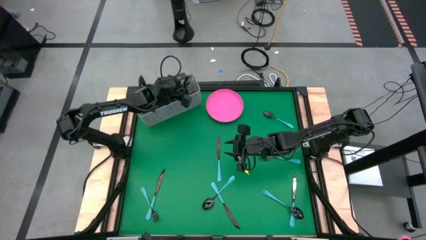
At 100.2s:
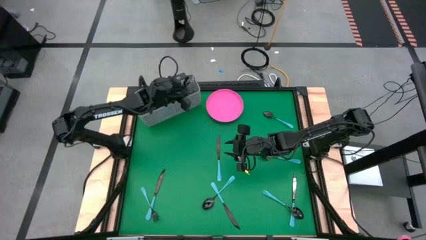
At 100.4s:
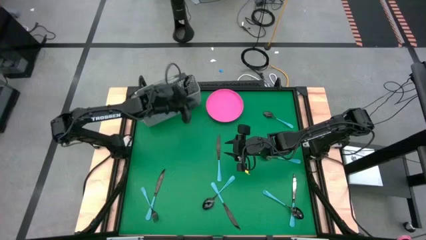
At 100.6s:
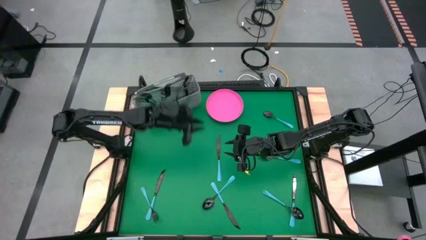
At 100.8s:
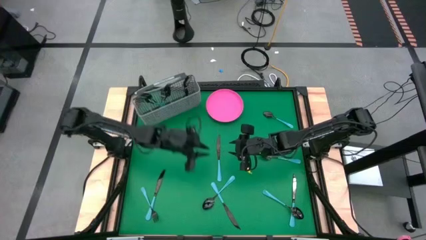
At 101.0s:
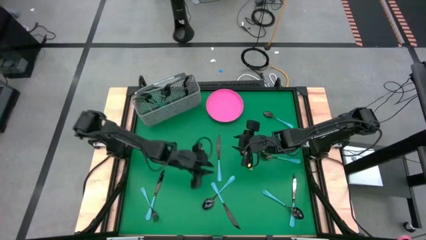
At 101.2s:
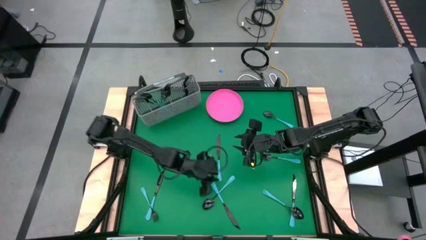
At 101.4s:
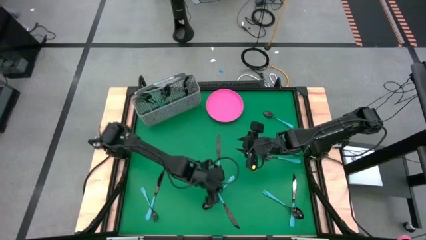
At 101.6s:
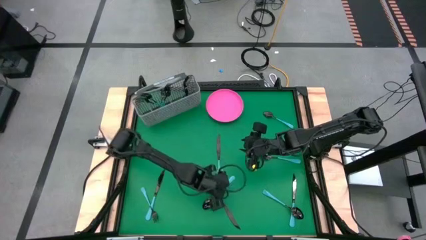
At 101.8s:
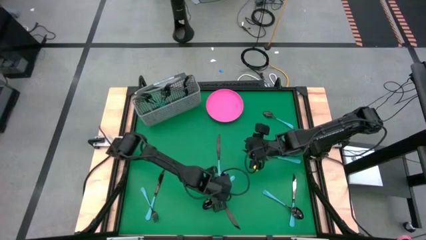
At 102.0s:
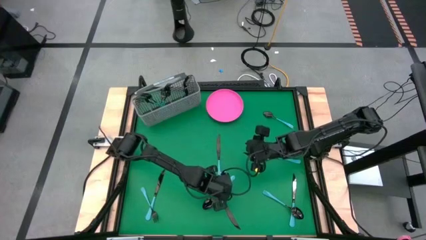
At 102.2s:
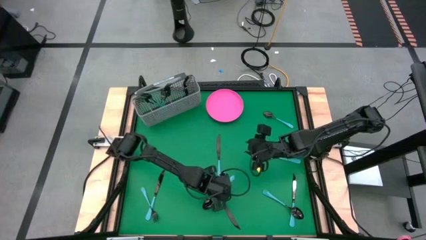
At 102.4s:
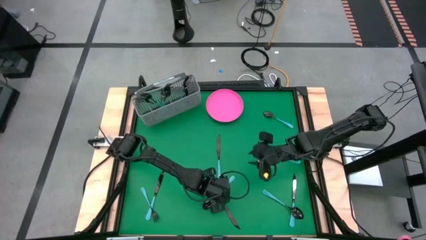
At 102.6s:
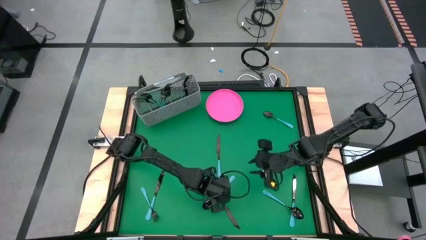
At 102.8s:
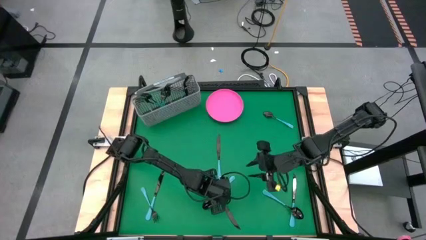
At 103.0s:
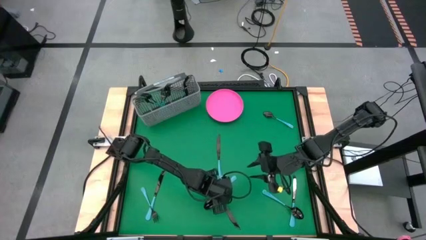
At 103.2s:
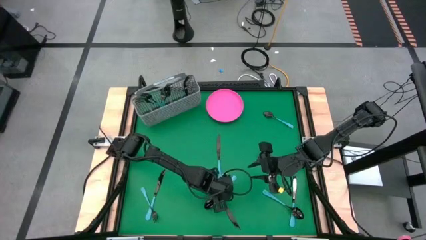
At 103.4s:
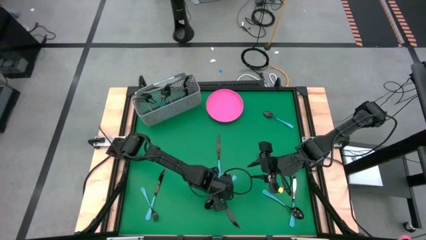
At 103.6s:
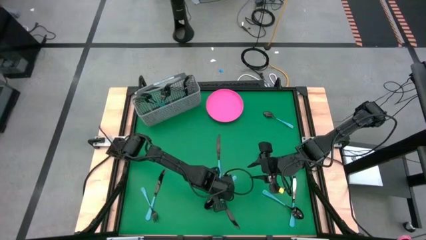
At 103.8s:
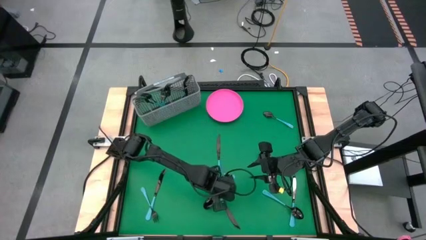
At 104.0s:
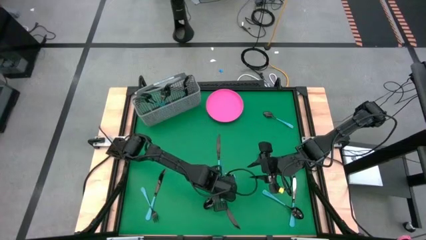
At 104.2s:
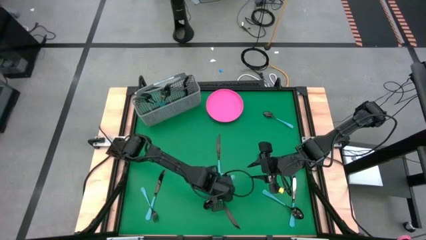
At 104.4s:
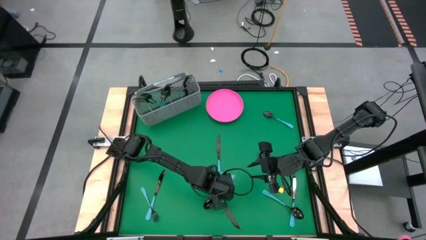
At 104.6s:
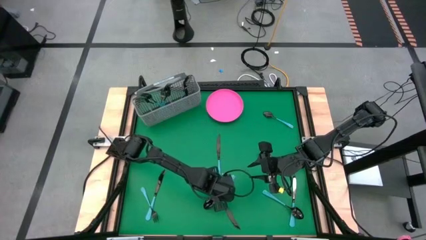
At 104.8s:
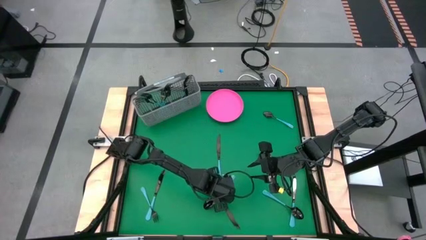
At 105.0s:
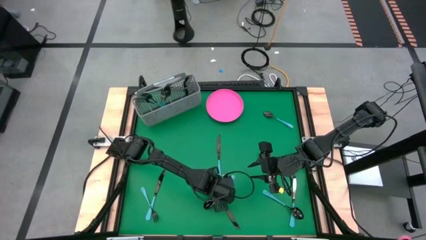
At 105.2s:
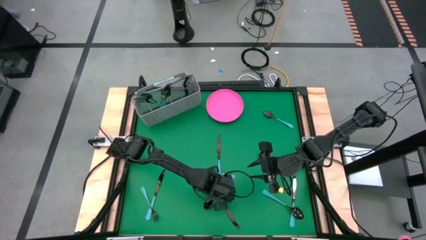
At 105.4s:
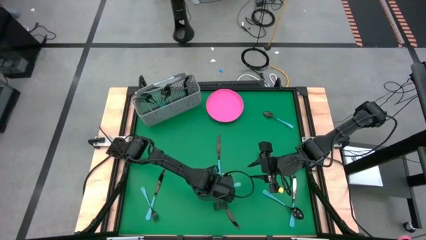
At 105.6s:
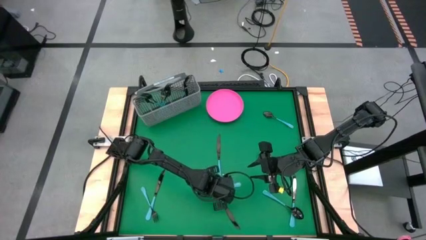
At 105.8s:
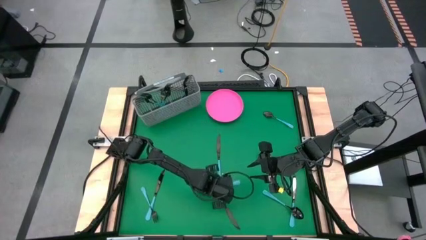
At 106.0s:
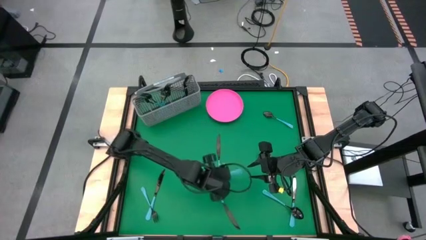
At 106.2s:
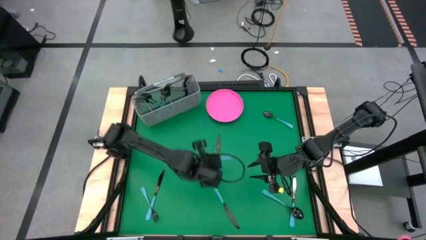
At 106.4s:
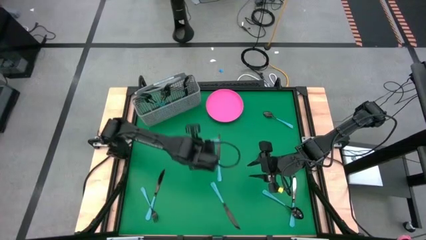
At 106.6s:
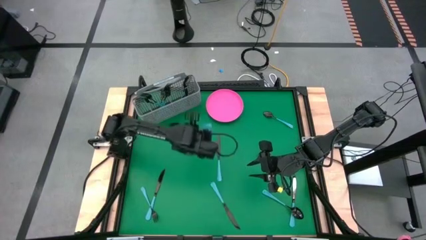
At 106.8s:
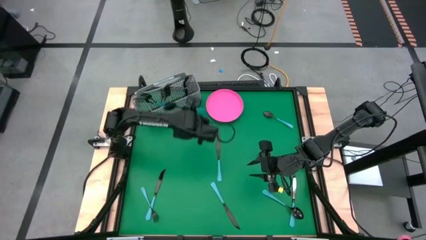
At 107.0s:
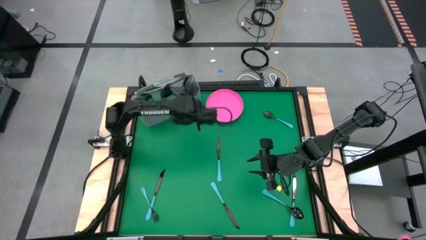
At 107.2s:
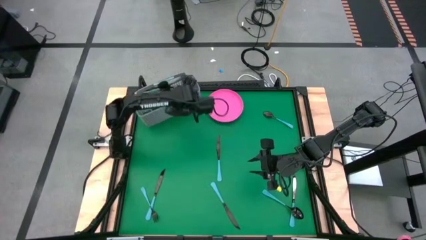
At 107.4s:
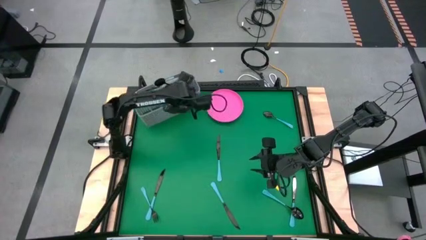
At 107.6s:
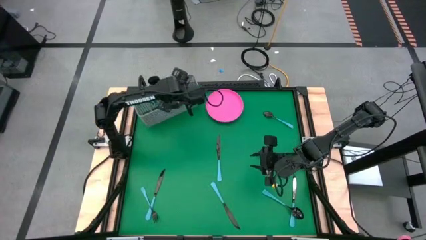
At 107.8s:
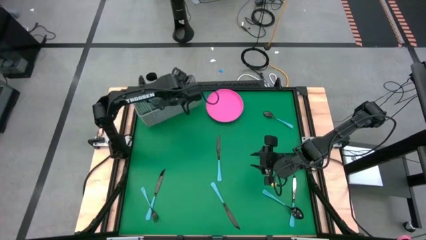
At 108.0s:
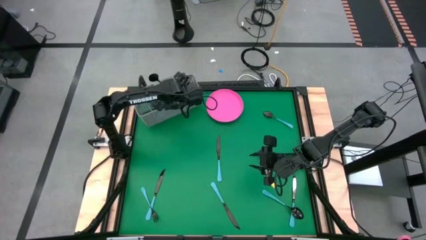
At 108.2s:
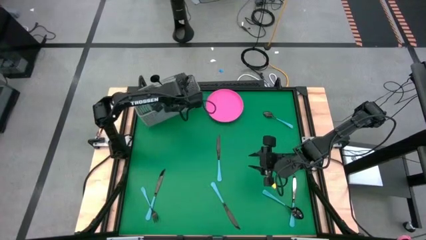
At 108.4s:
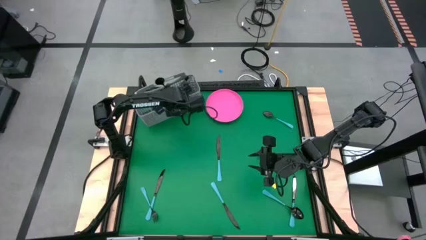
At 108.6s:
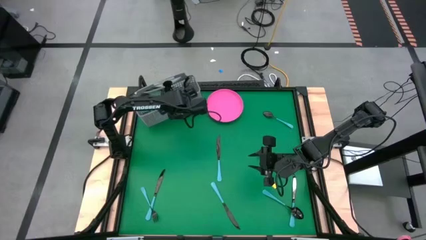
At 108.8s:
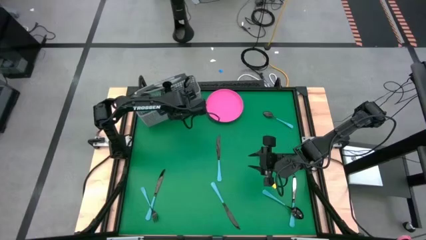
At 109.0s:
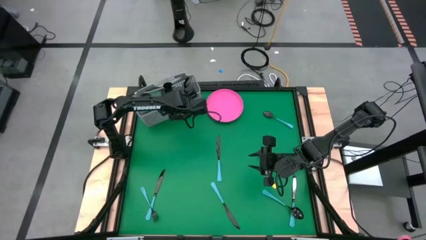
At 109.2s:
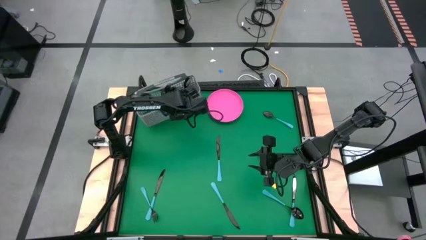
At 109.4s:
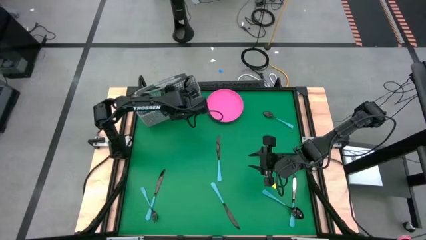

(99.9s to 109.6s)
Task: Sort silverware
Put the blue spoon into the gray silverware holder

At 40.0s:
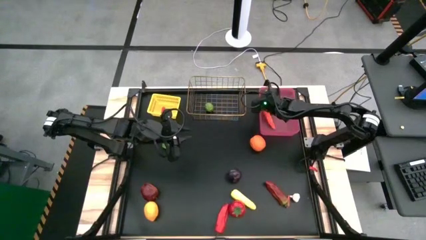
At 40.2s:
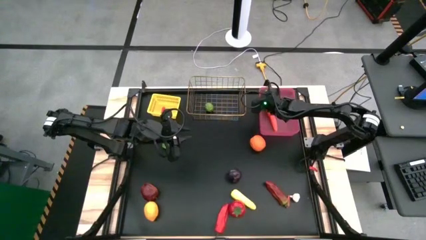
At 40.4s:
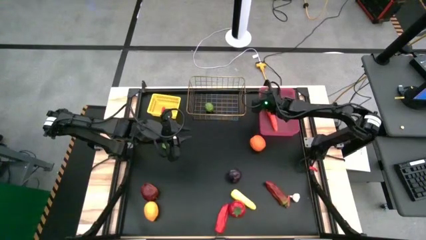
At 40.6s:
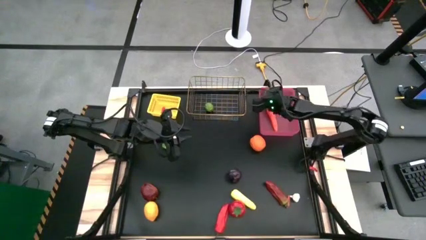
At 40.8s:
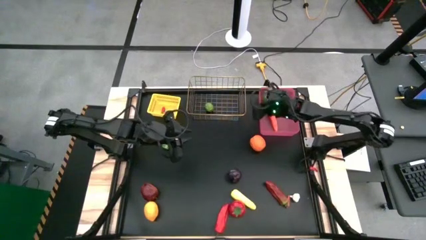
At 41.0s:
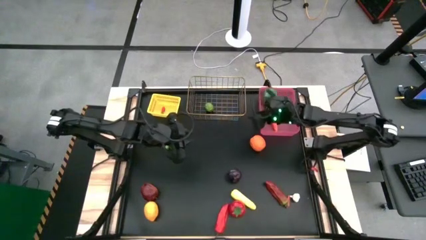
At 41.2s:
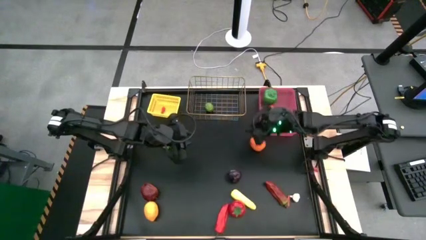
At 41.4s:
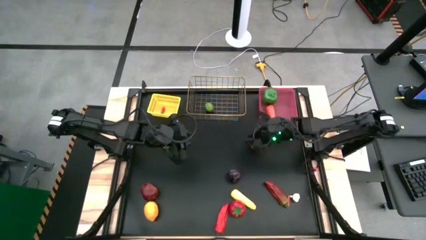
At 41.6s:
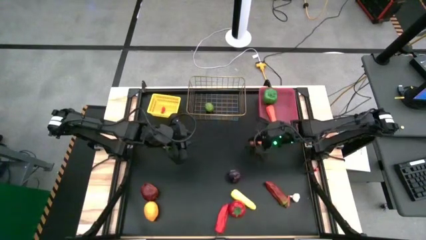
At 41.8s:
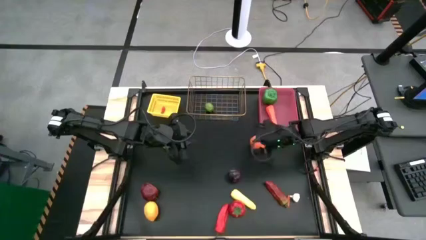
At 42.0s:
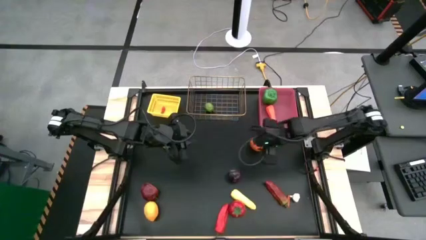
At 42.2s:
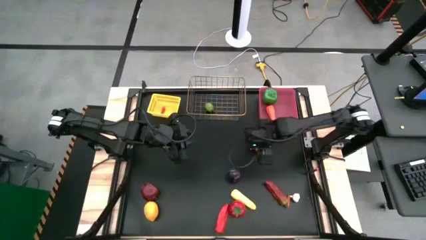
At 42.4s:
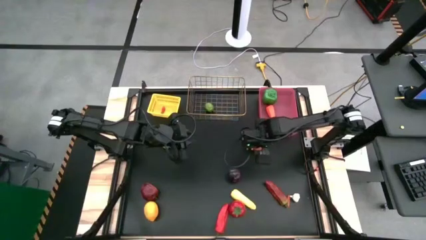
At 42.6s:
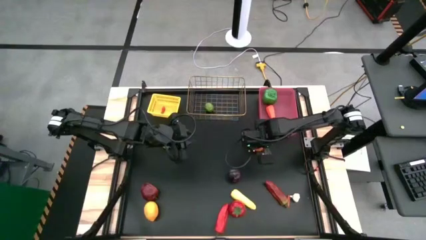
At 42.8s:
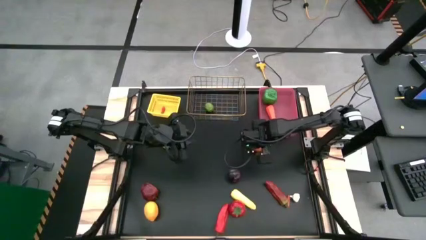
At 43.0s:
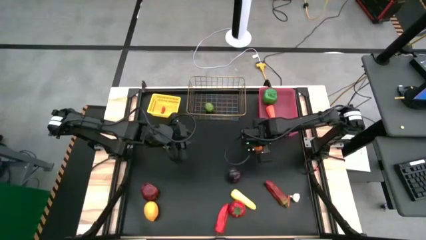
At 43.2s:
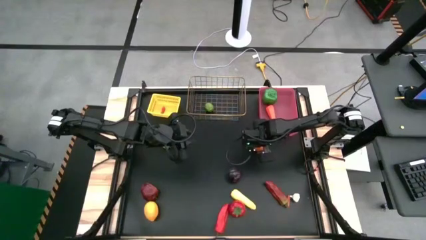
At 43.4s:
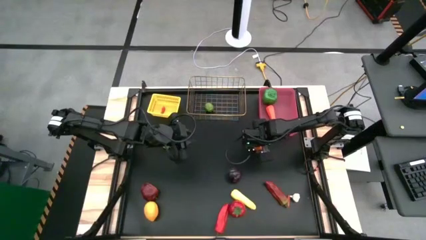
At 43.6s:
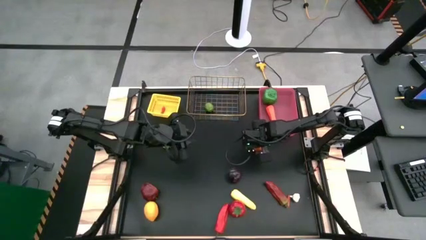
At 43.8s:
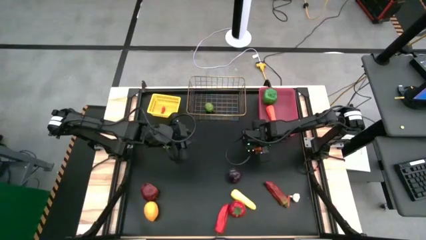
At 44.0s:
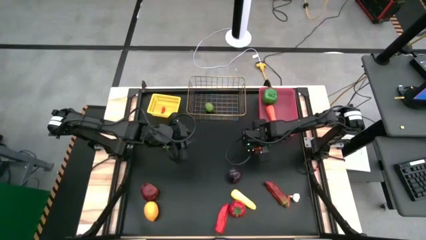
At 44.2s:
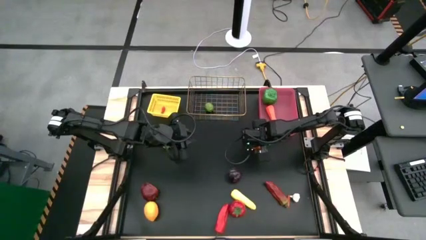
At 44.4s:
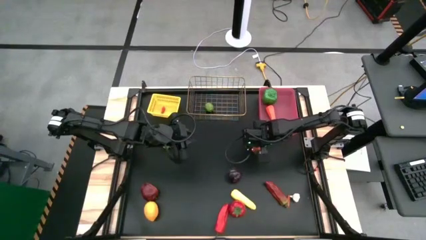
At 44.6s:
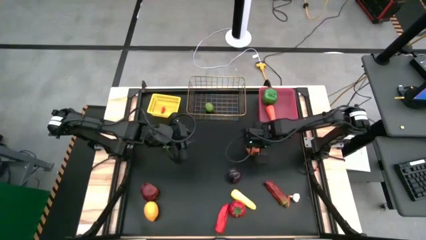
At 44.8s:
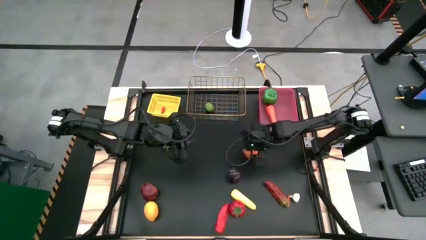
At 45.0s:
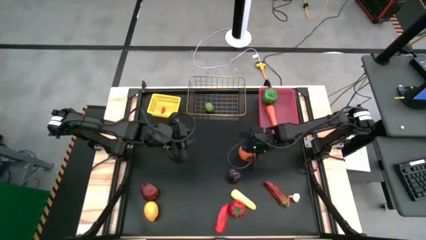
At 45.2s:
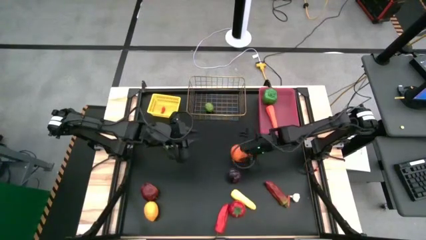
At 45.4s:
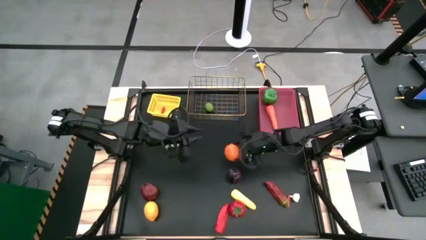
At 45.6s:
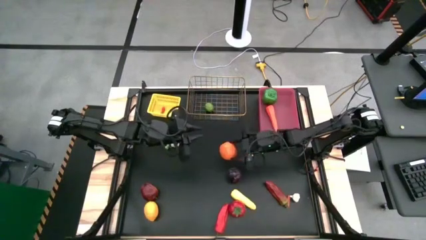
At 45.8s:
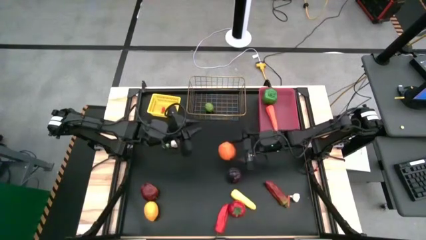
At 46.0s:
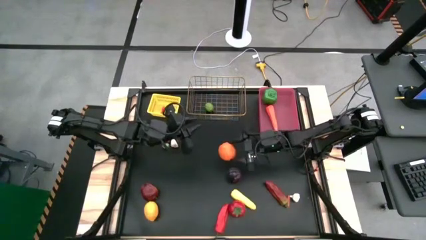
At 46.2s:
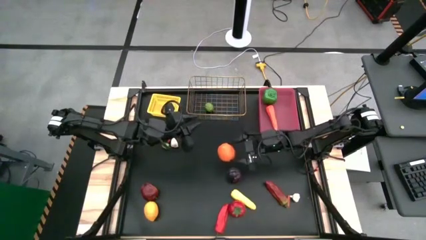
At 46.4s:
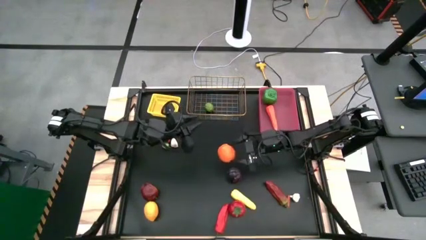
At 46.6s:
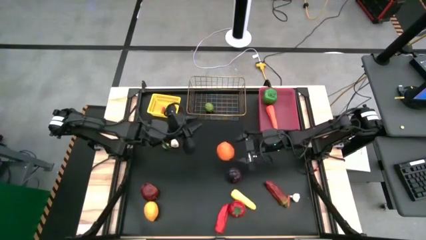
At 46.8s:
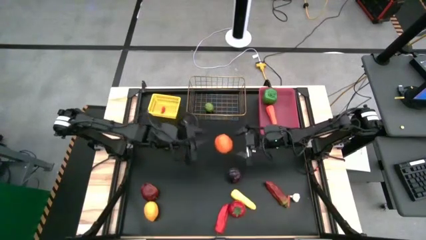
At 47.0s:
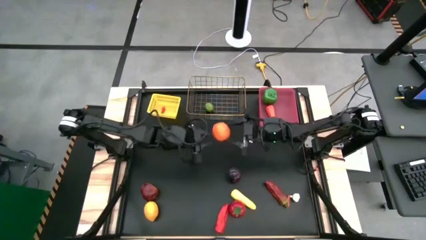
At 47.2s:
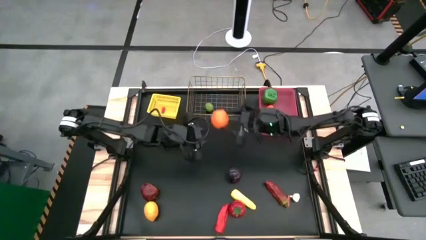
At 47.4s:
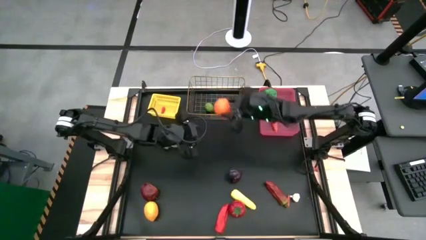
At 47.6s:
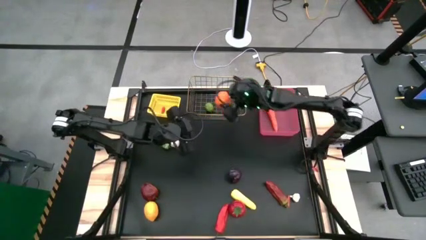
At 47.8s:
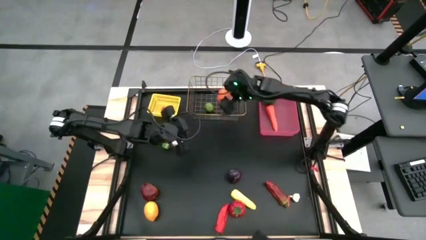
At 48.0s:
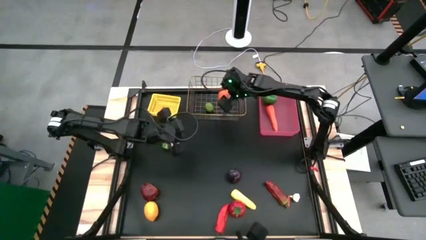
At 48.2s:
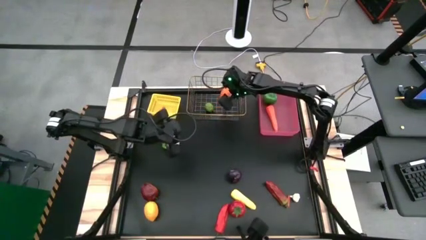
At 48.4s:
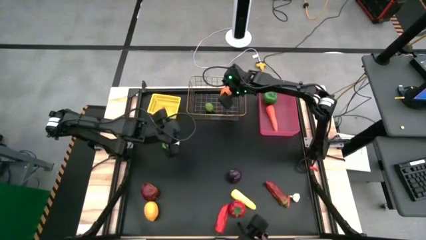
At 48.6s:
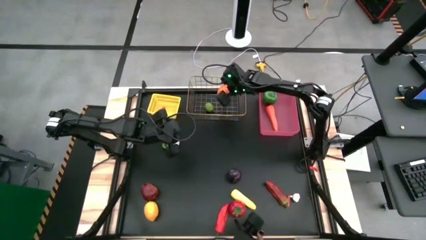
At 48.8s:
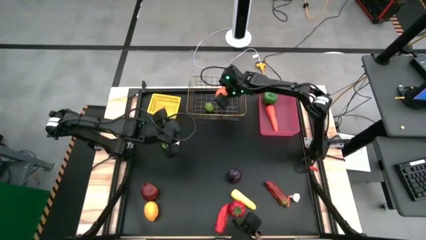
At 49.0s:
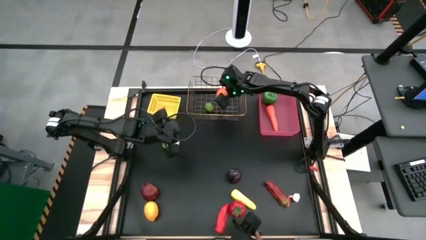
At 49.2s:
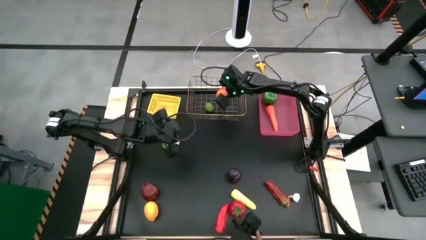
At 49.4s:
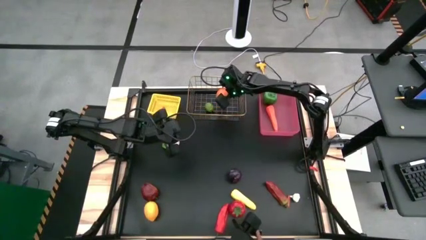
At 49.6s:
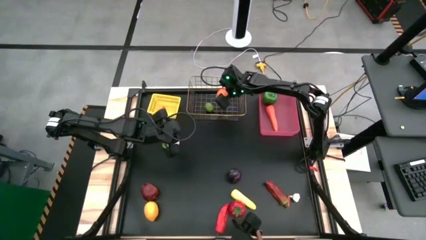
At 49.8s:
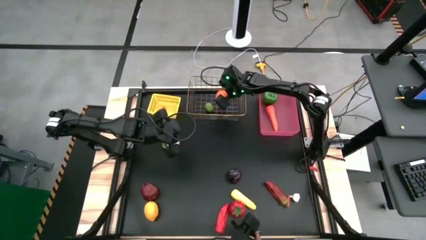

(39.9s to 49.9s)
Task: Sort produce into baskets
Put the orange into the gold wire basket
